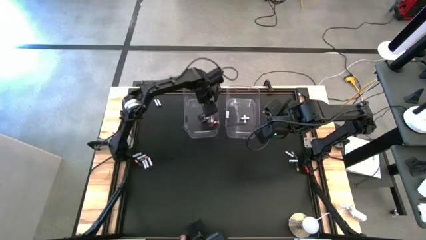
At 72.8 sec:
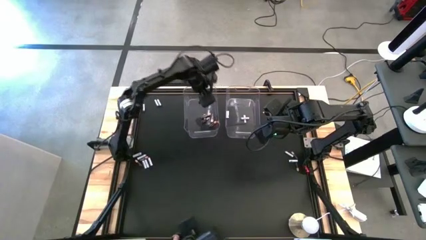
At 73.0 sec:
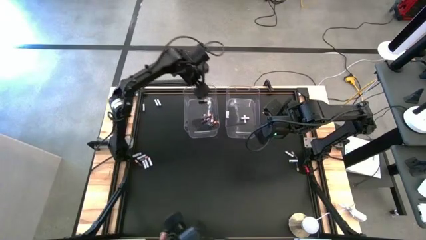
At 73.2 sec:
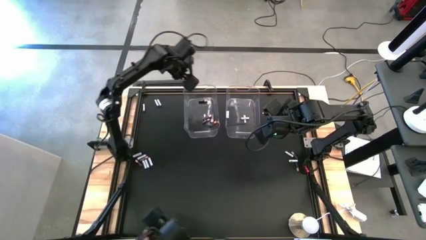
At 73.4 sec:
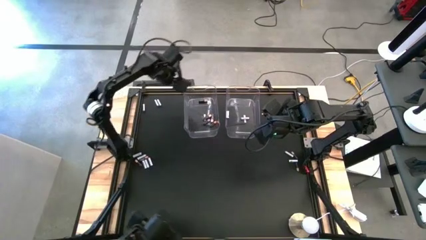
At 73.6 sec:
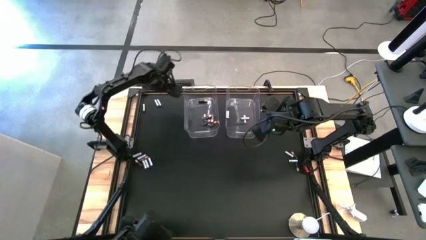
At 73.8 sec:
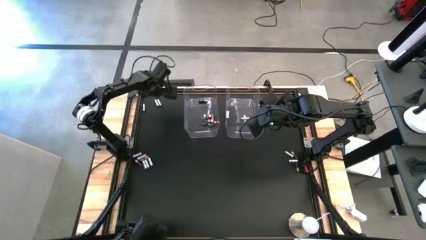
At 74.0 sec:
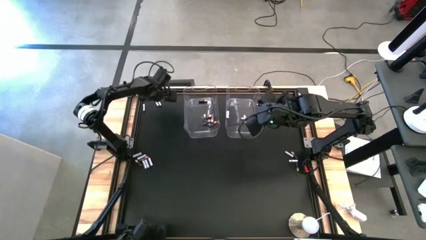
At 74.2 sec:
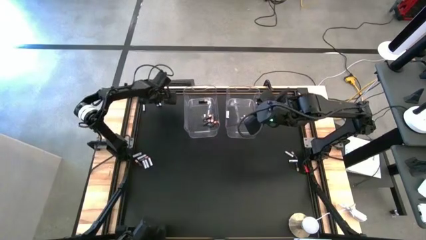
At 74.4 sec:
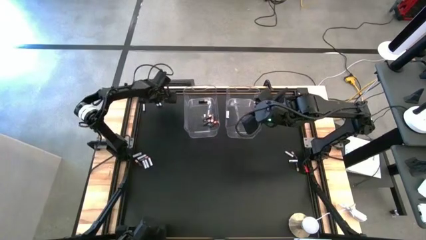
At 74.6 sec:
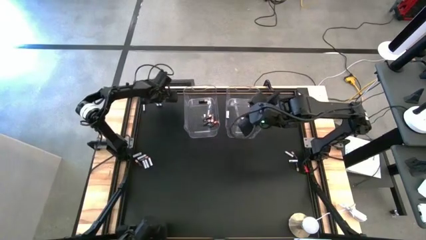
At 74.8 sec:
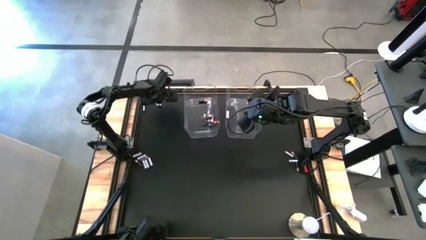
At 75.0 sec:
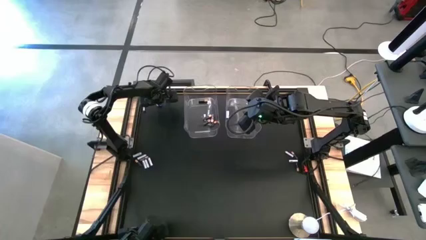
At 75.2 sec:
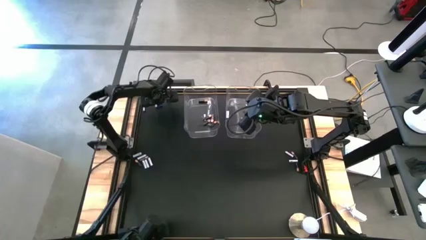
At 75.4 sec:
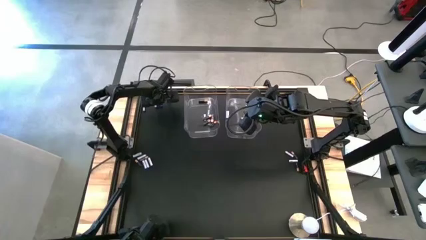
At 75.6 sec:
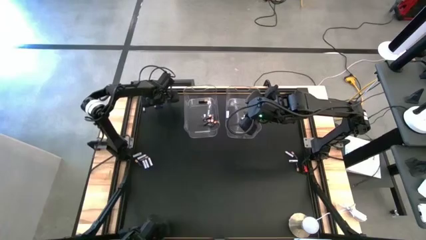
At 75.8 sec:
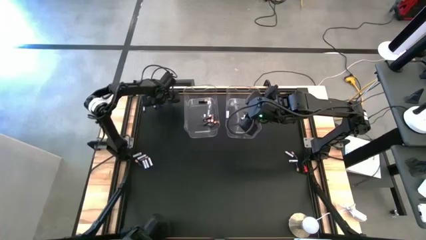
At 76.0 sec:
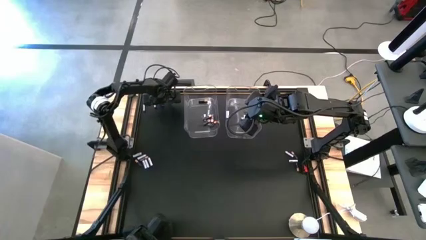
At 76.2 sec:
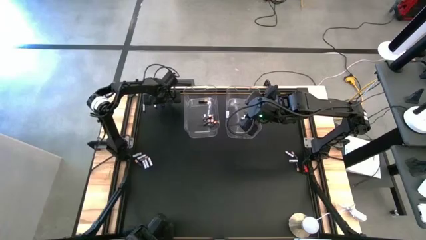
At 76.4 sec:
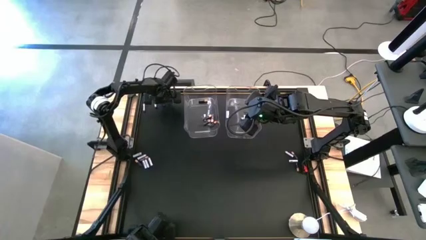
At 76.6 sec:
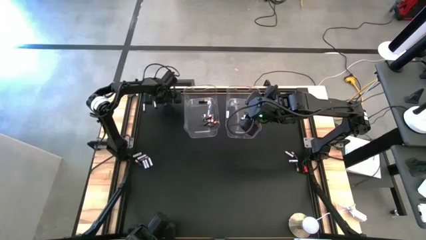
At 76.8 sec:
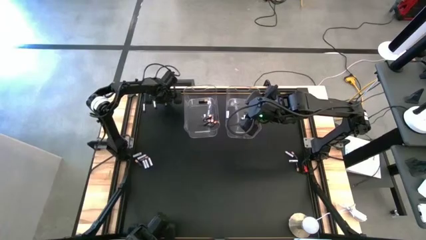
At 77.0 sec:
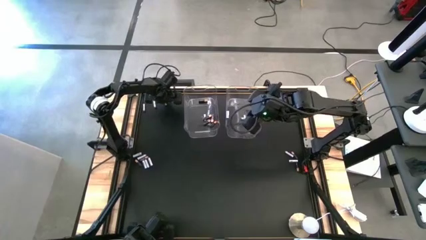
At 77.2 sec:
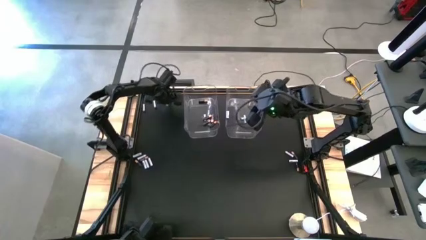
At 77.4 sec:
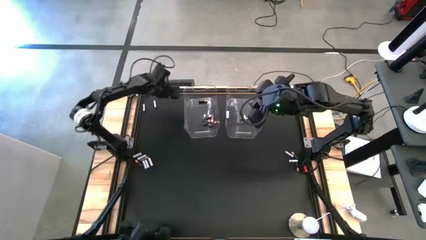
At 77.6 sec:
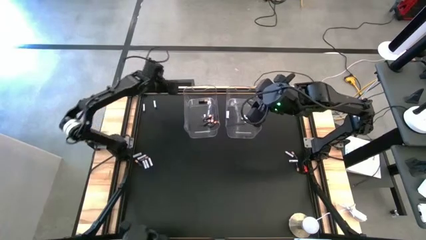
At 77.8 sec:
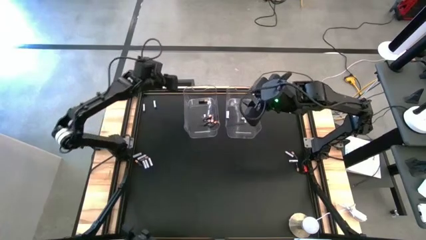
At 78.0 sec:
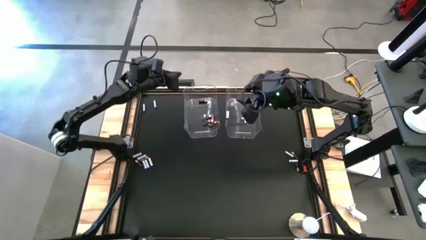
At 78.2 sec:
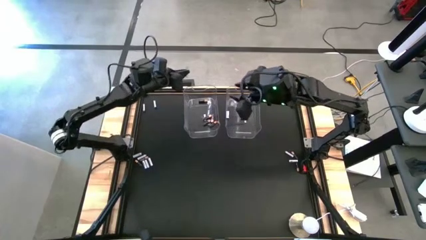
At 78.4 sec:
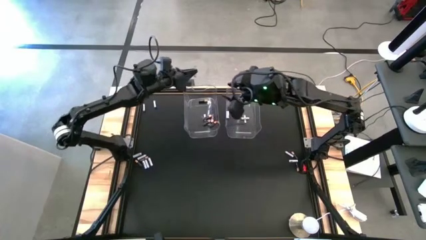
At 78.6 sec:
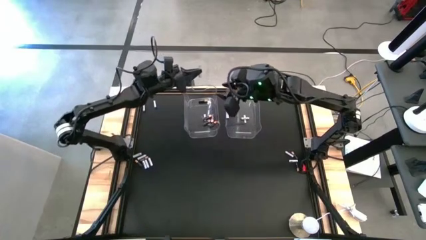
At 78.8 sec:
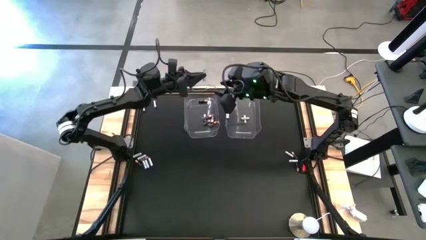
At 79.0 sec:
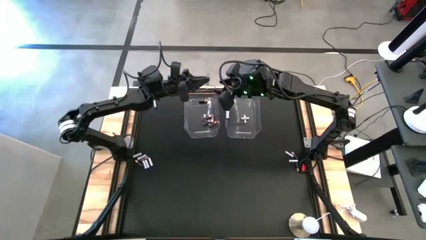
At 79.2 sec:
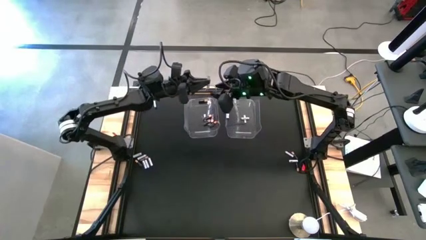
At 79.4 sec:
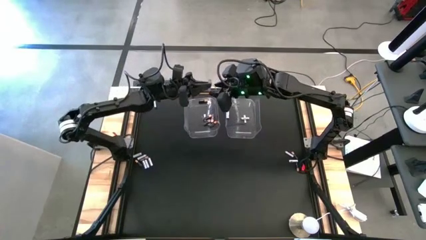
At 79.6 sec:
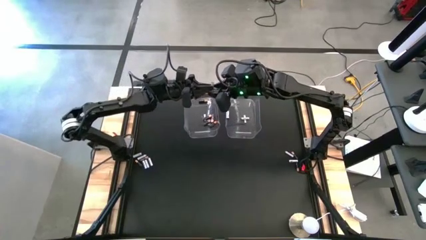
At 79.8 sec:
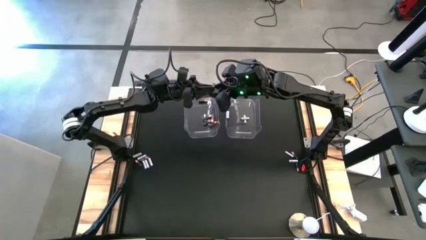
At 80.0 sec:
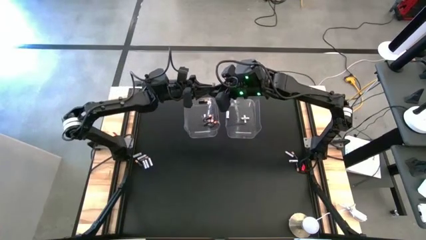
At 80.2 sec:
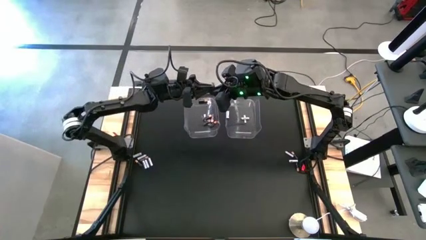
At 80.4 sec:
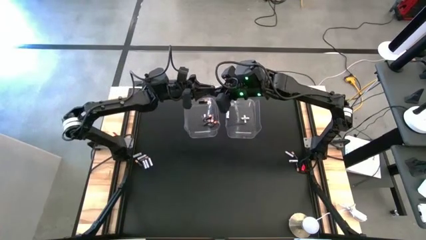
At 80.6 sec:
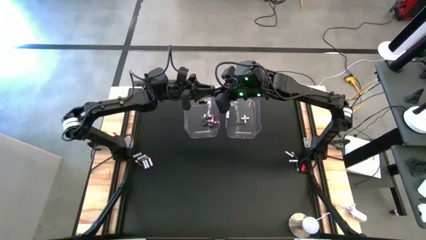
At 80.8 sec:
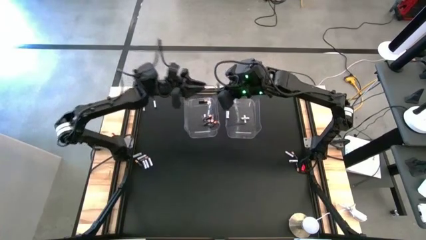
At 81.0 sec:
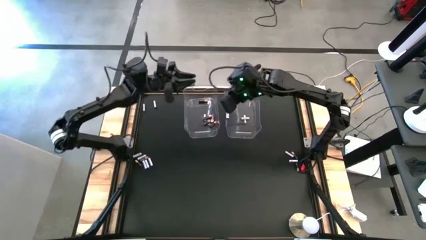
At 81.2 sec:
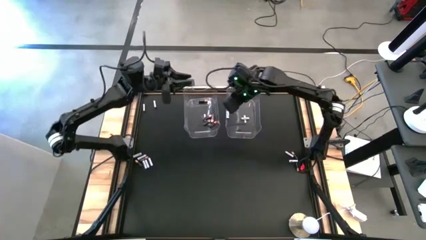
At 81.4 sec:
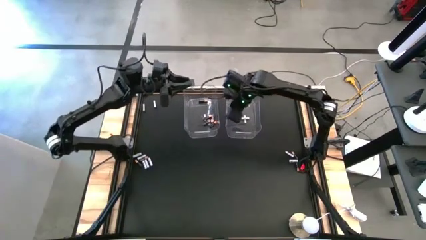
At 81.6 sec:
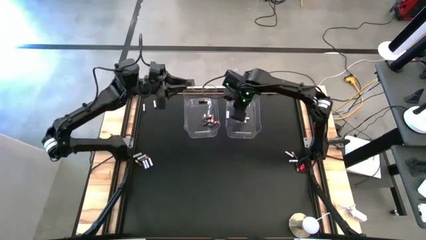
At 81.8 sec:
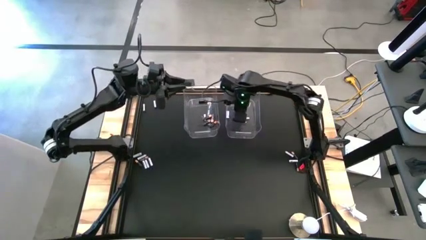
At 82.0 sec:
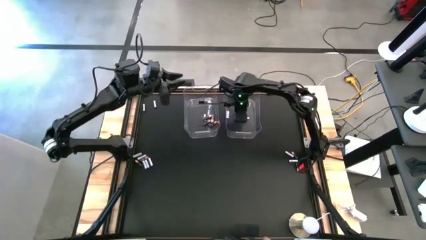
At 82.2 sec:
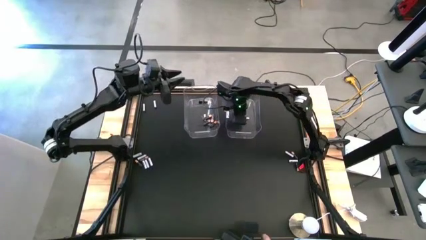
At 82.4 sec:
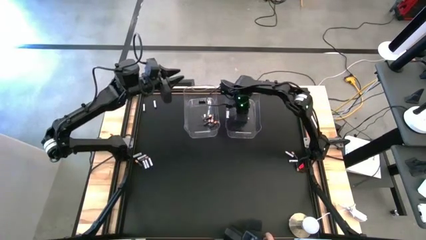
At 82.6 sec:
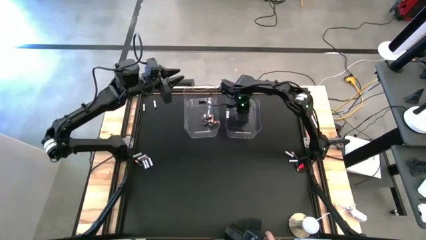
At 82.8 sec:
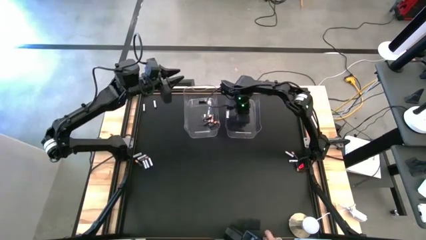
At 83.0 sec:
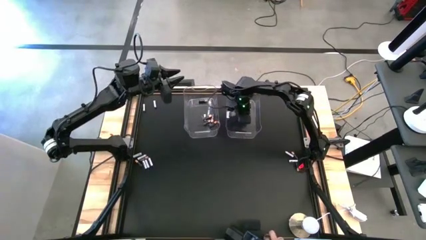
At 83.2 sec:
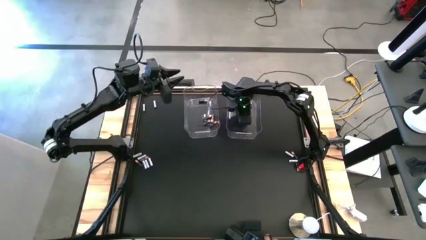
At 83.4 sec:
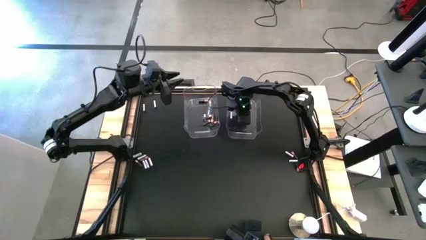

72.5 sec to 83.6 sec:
Task: Sort batteries
Put the white battery into the right transparent bin

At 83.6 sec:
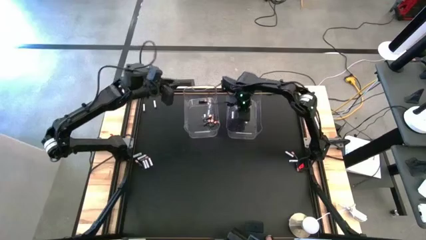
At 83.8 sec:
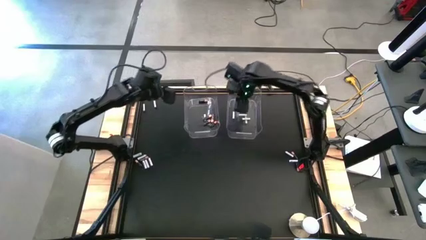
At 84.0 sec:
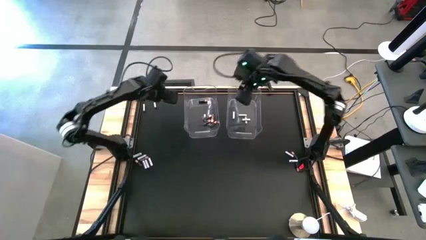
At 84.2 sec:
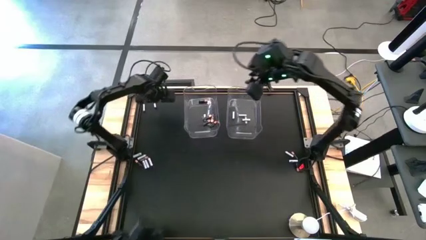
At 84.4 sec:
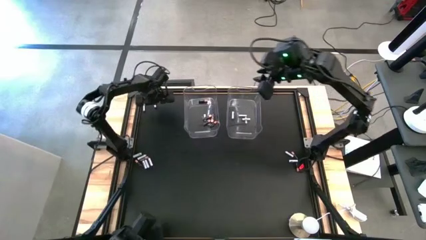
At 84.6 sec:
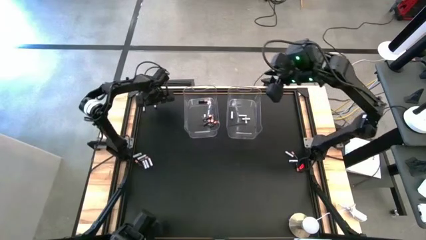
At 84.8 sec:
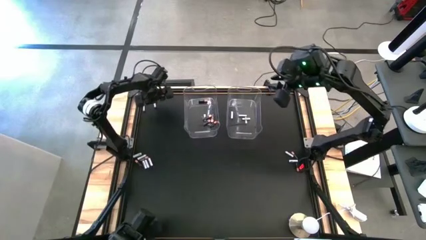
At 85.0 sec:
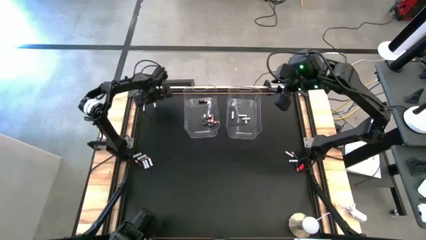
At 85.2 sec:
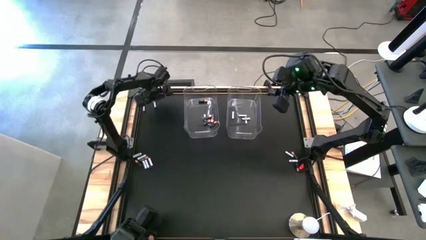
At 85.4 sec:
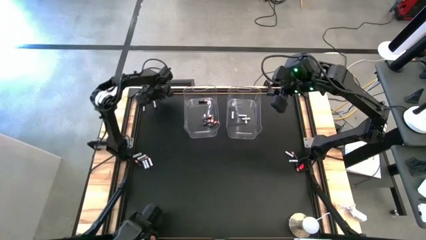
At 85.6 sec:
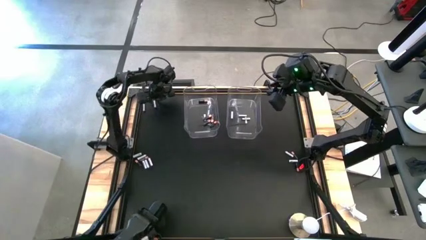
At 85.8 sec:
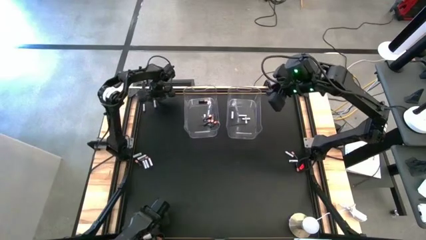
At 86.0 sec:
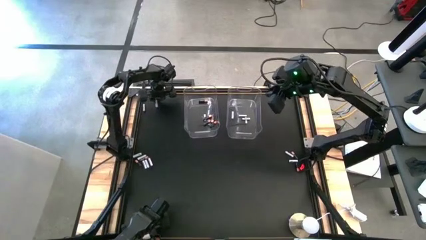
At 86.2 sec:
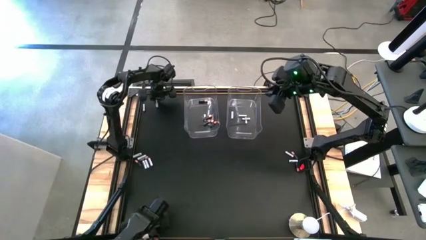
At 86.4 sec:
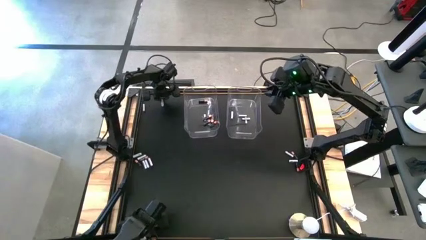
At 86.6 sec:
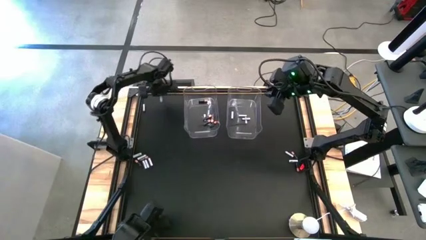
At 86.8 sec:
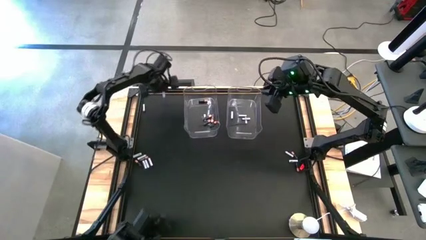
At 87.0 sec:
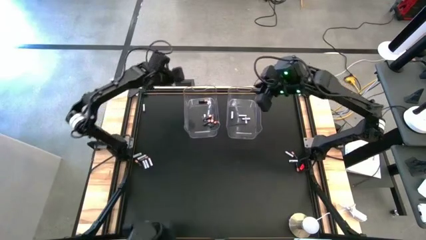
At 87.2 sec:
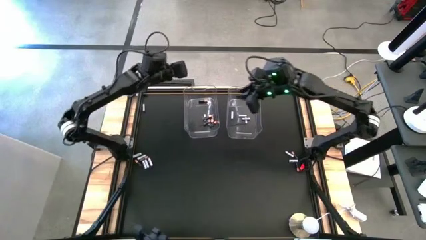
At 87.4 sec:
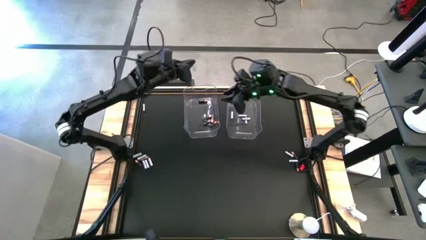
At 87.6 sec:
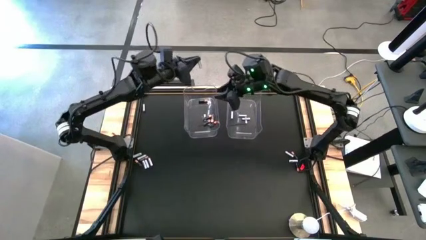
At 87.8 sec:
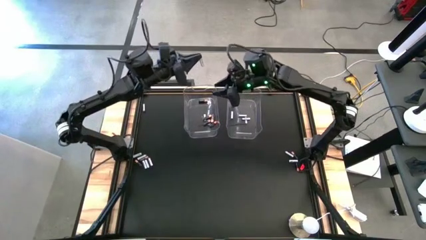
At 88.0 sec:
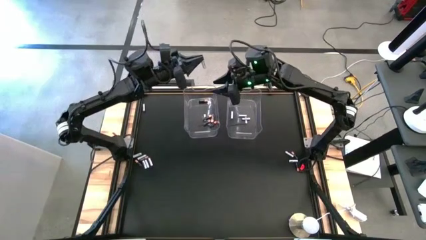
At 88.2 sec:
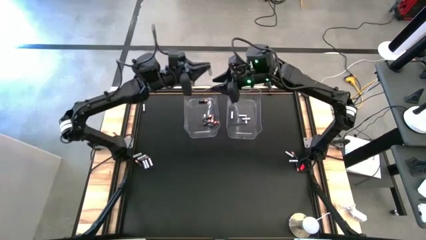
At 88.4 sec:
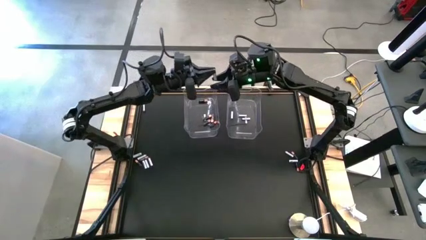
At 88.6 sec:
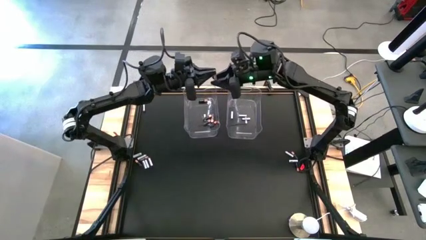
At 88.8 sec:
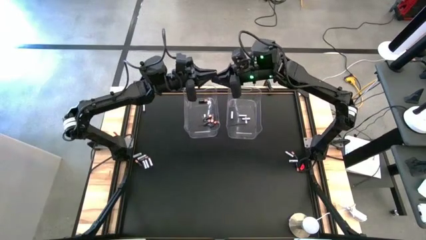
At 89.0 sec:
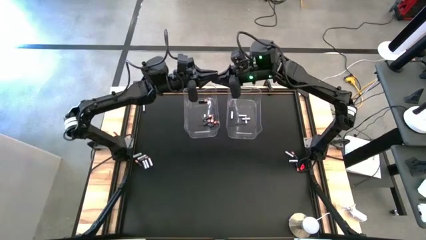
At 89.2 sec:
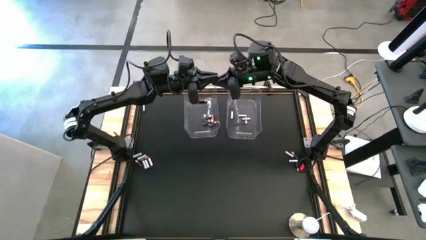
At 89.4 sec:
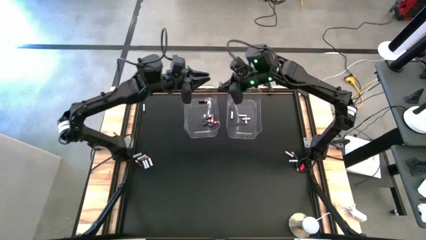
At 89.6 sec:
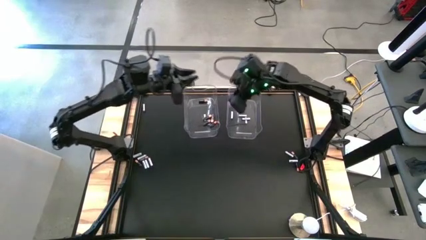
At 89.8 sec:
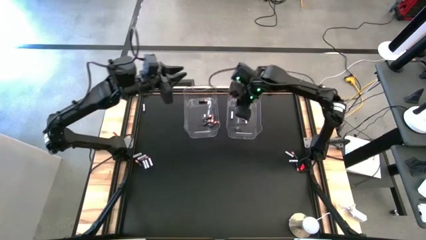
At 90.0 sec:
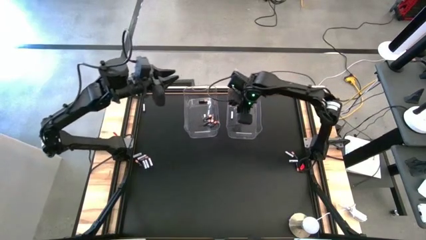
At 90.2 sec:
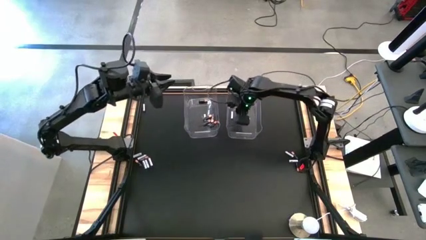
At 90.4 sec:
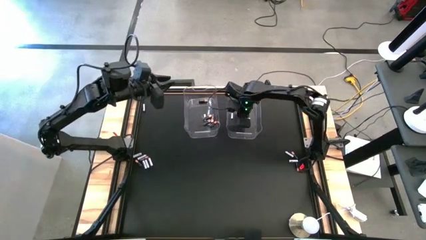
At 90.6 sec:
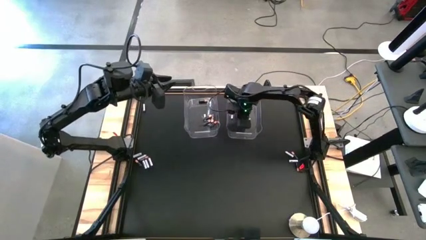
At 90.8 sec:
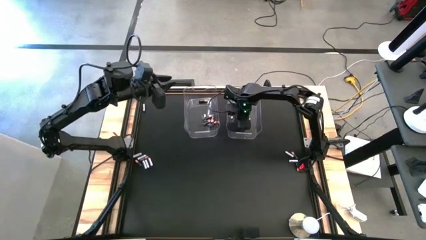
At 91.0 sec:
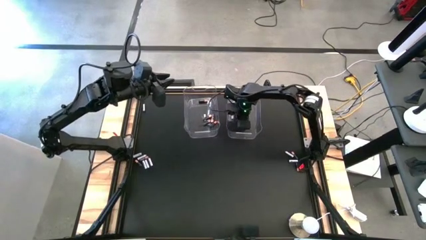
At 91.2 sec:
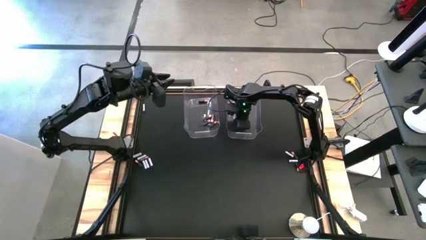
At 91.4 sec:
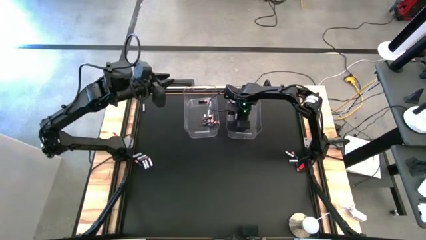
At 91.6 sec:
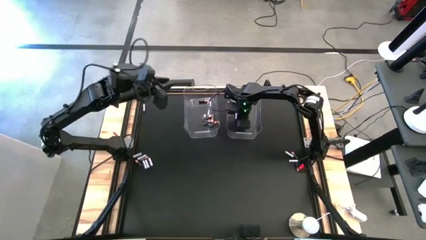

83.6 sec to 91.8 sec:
Put the white battery into the right transparent bin
